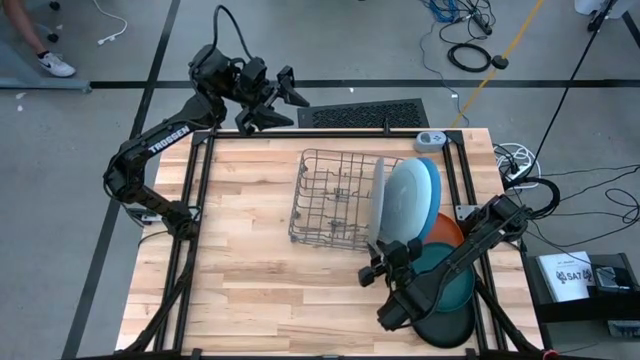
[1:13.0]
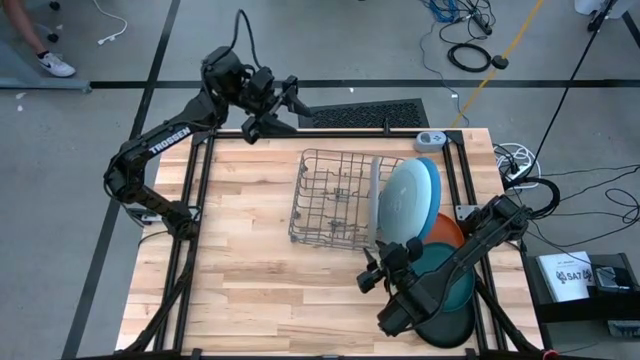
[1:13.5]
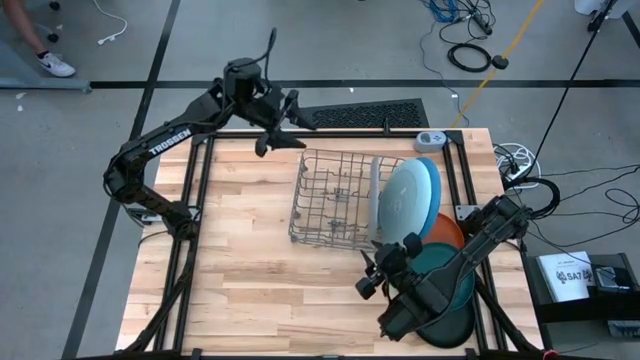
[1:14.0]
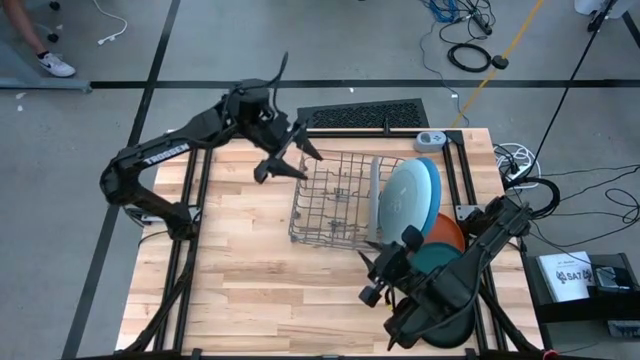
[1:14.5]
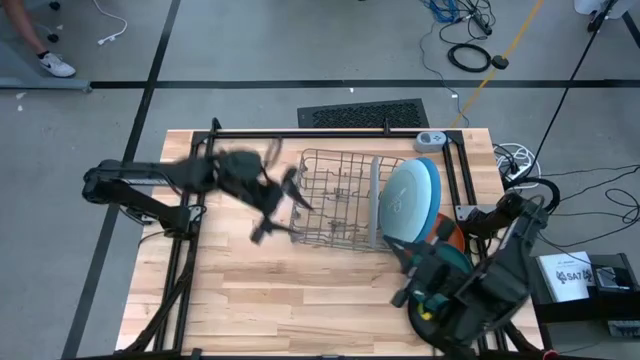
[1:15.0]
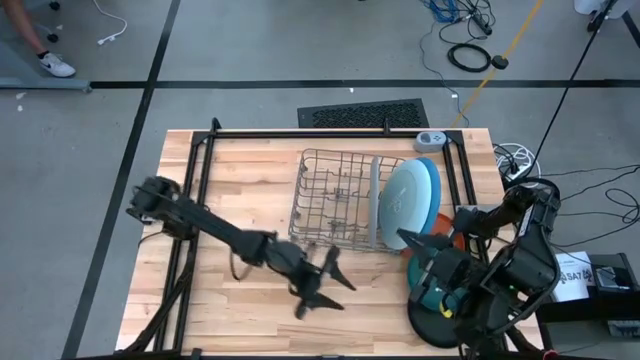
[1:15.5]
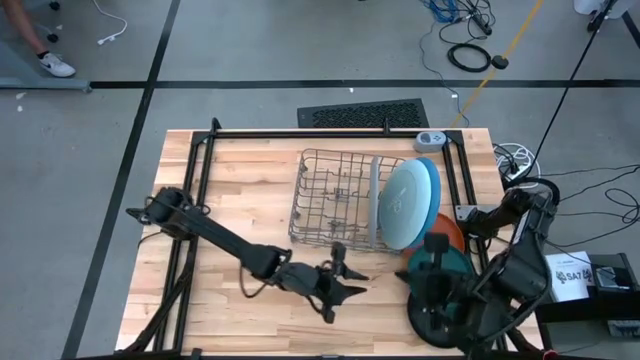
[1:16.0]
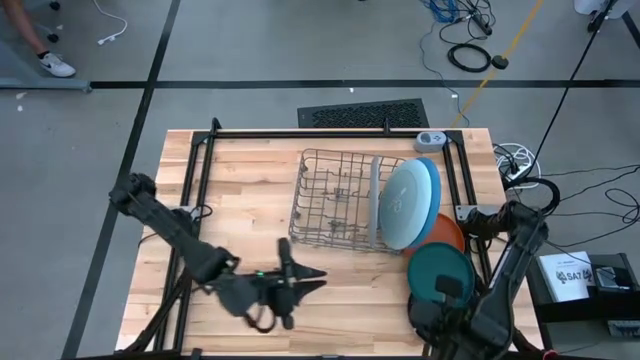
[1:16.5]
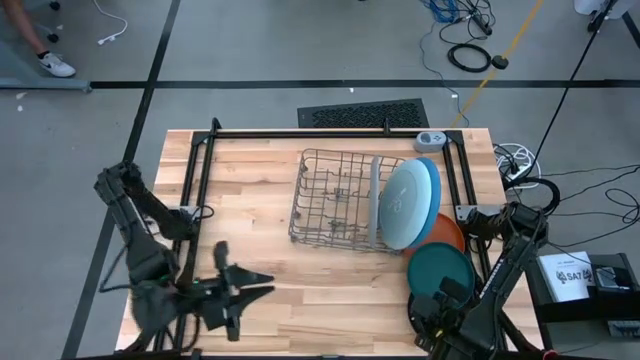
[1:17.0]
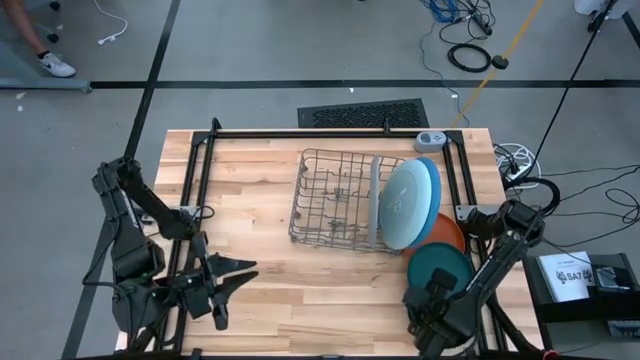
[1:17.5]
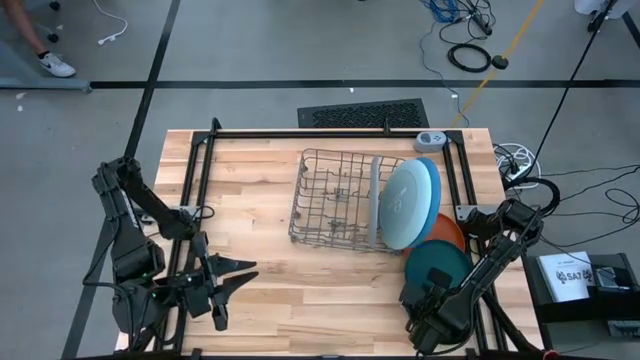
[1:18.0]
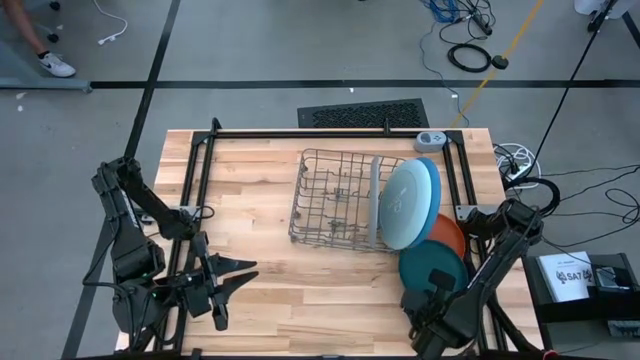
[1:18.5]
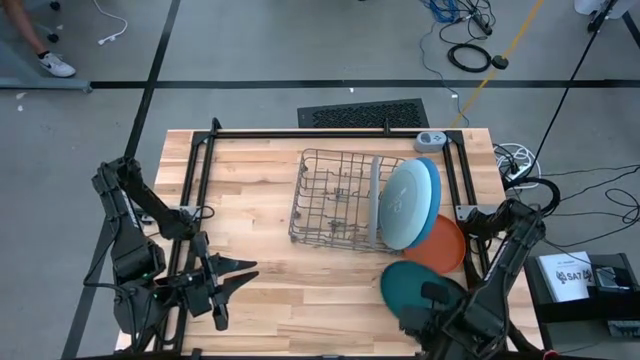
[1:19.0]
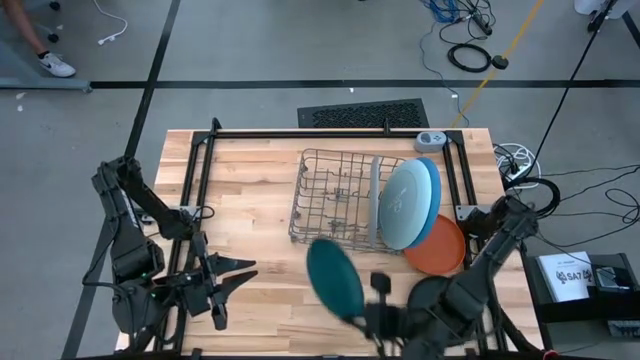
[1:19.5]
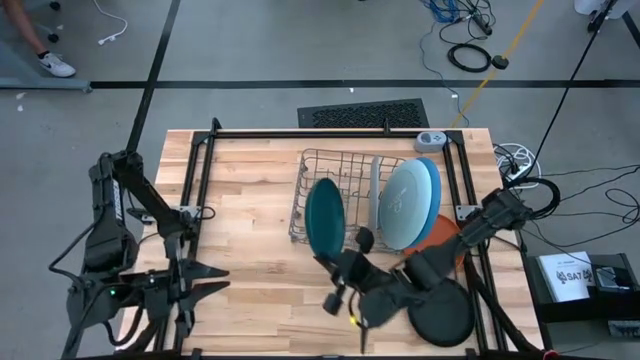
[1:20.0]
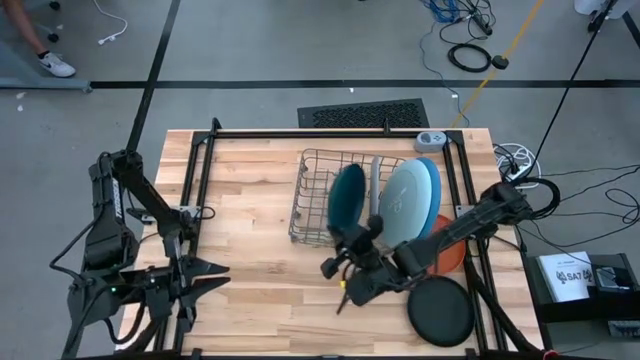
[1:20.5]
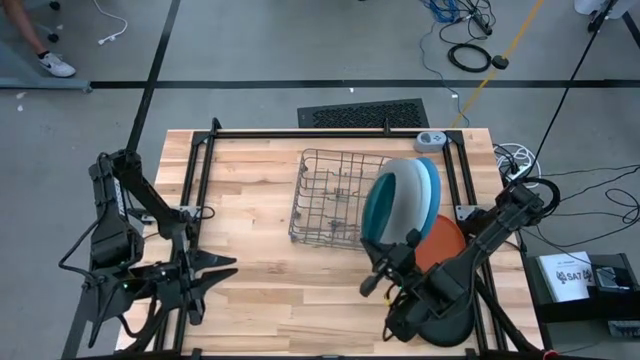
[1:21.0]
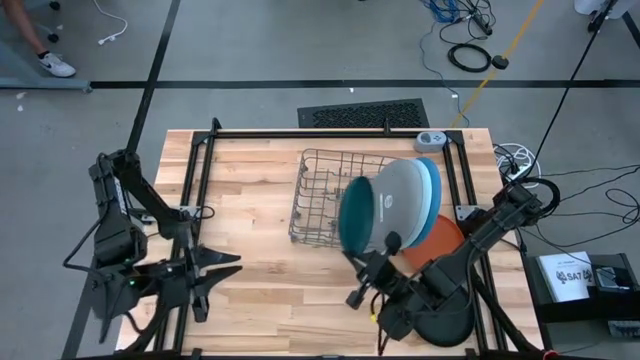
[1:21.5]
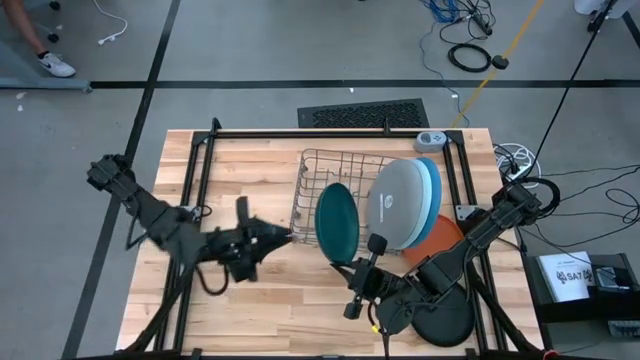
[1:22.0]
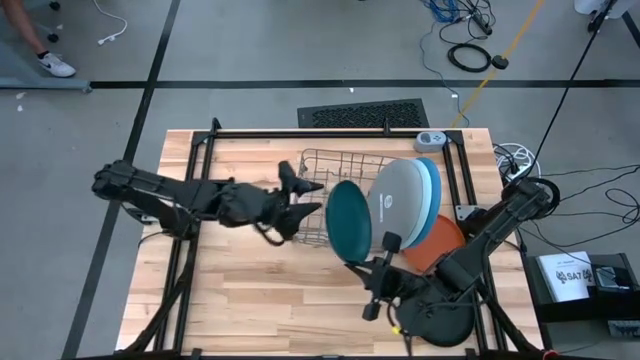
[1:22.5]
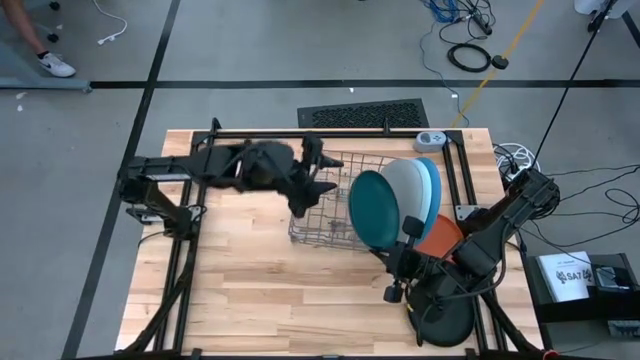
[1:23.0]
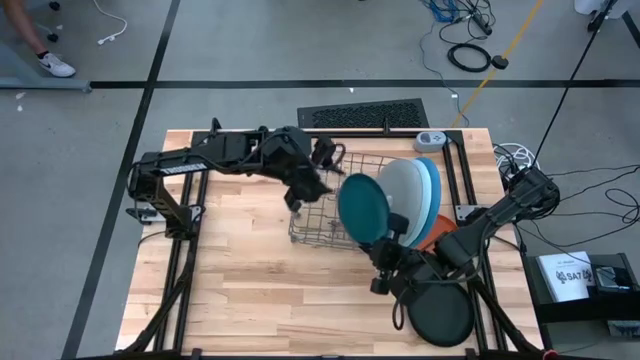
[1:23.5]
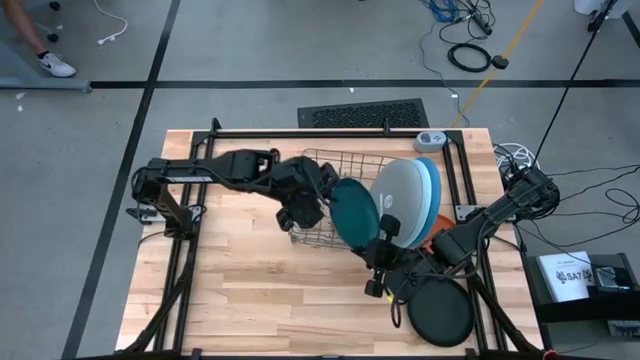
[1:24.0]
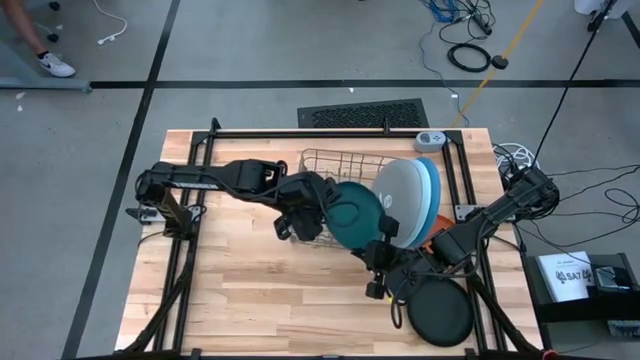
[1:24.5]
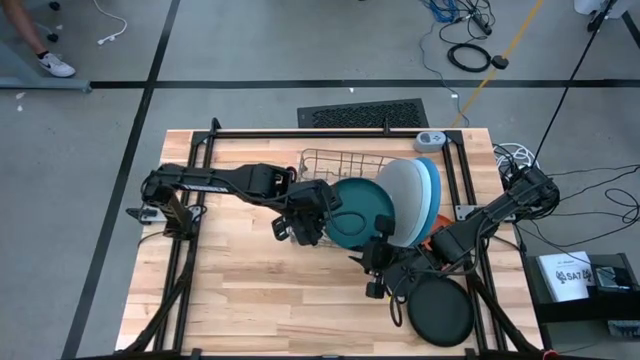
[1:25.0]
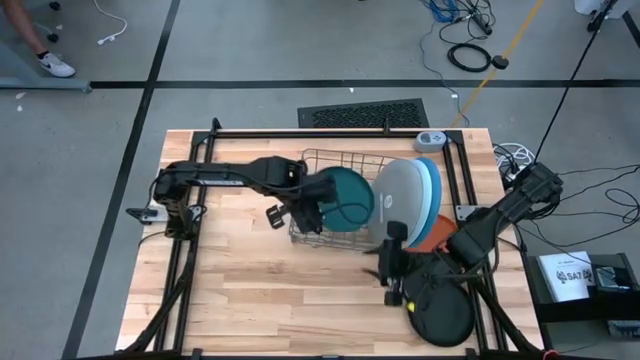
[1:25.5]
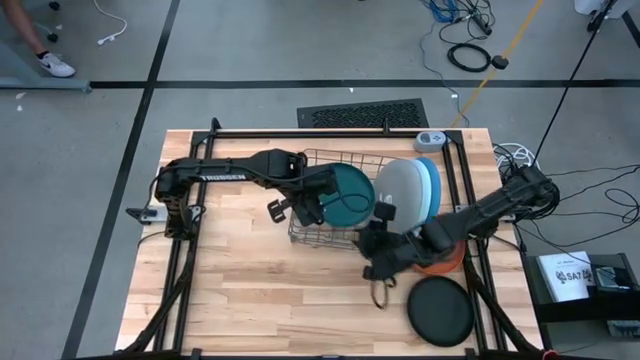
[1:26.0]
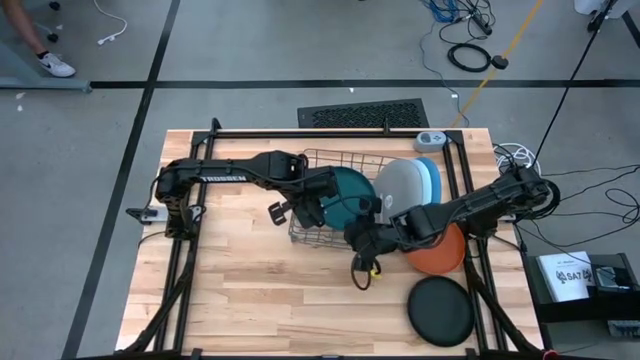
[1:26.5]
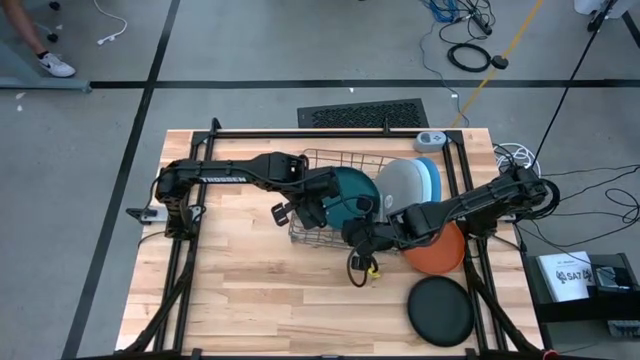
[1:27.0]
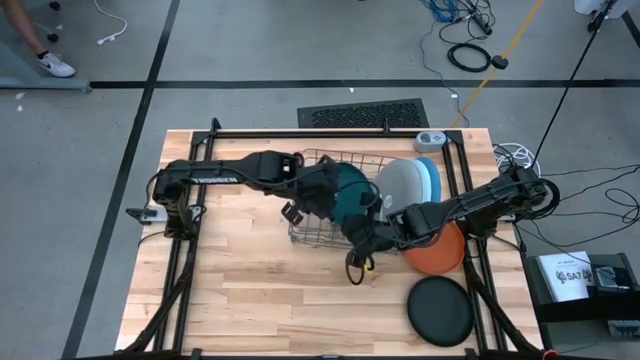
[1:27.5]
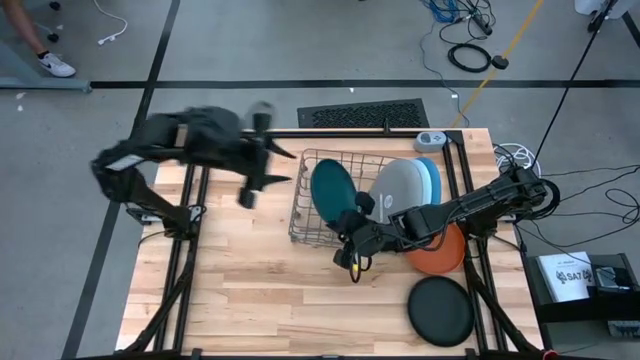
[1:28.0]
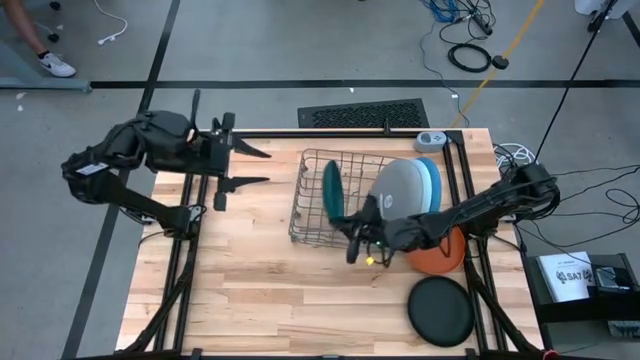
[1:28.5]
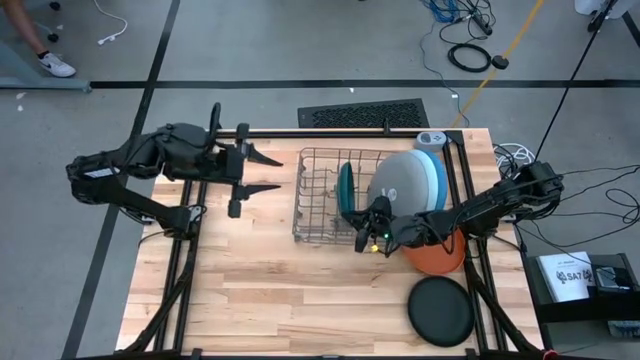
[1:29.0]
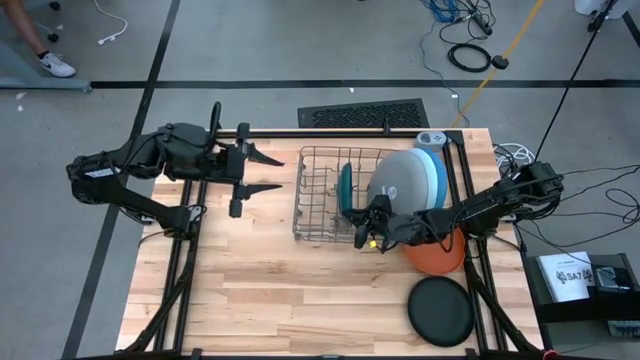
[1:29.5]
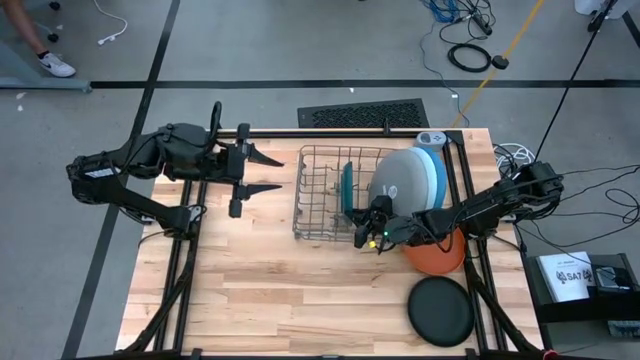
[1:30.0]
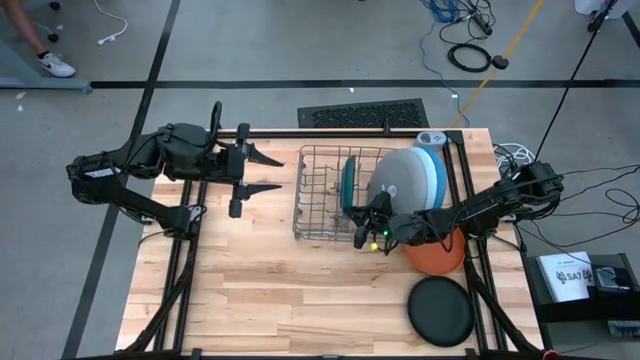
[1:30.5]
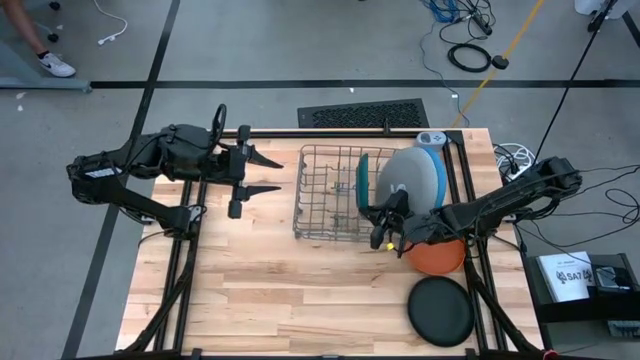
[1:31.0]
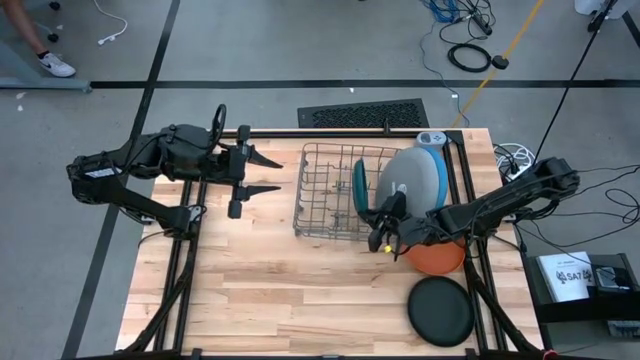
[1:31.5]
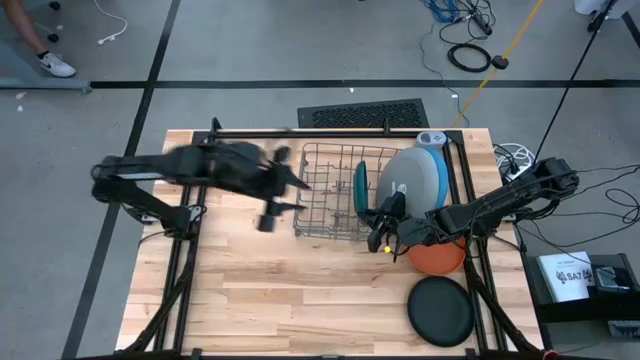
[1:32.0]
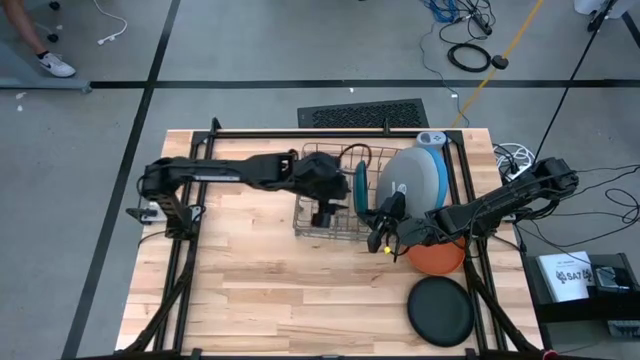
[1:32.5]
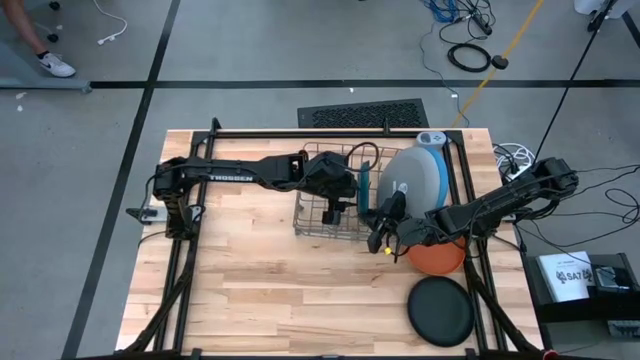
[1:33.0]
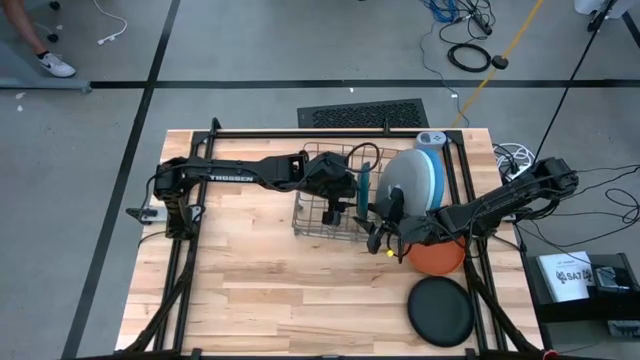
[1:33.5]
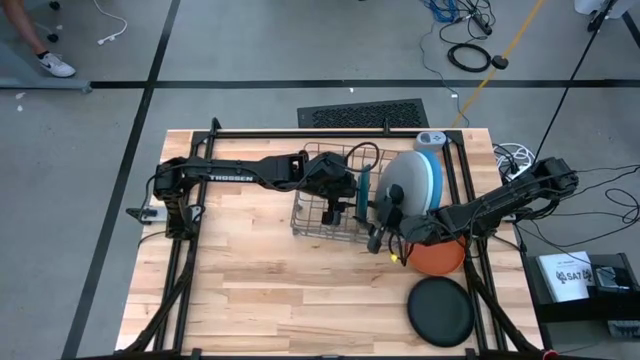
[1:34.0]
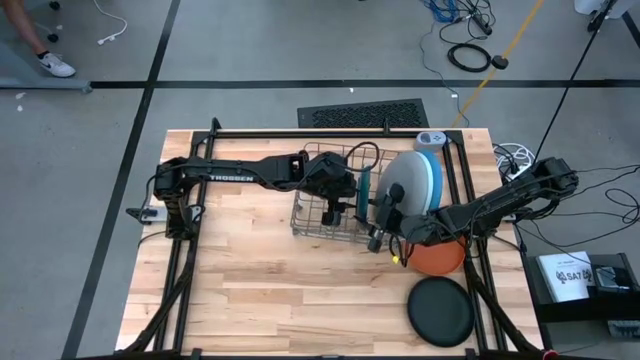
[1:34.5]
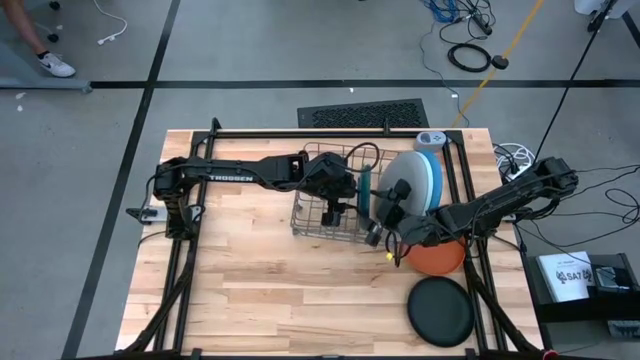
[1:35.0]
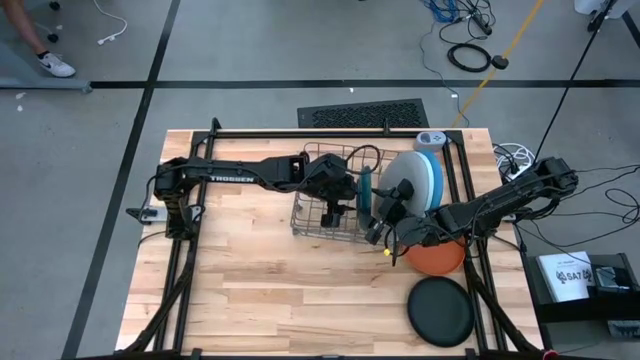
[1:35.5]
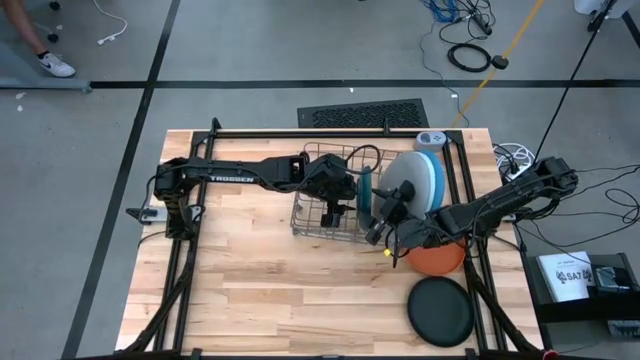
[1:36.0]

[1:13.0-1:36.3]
Task: Sort dishes
Put the dark blue plate into the dish rack
